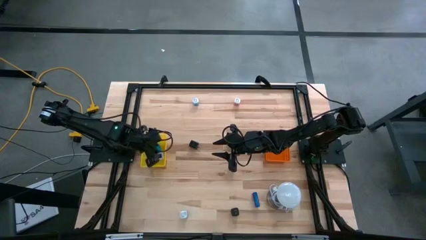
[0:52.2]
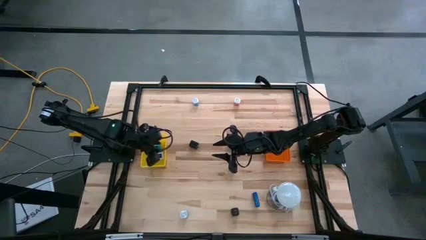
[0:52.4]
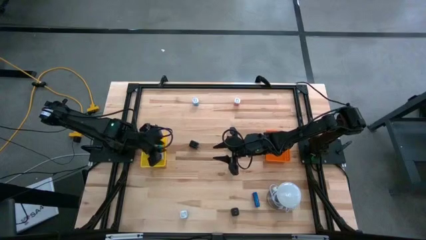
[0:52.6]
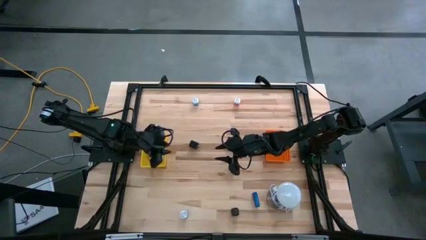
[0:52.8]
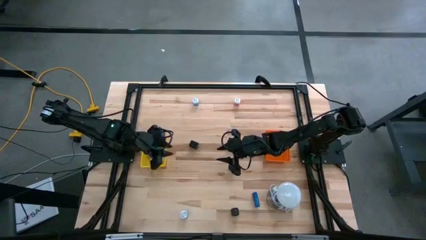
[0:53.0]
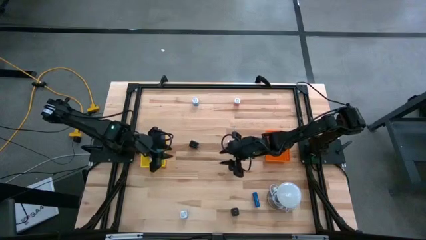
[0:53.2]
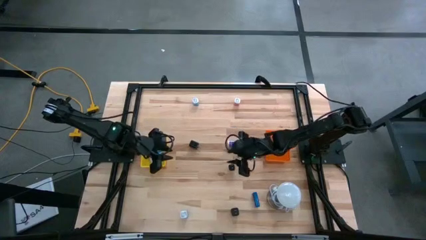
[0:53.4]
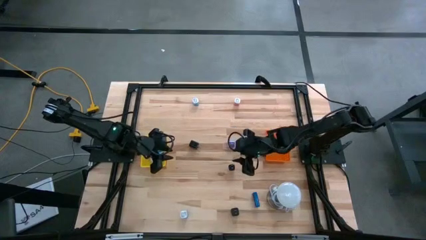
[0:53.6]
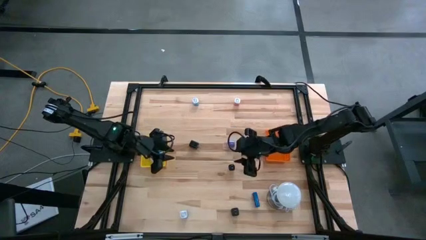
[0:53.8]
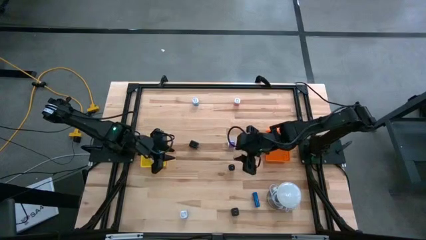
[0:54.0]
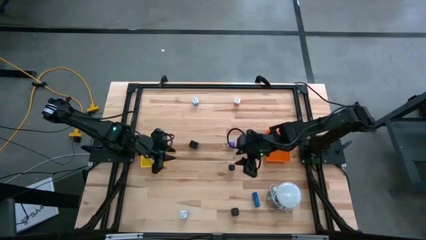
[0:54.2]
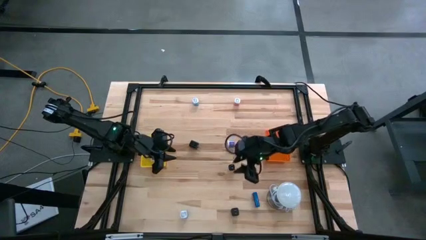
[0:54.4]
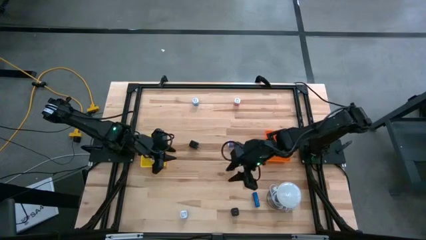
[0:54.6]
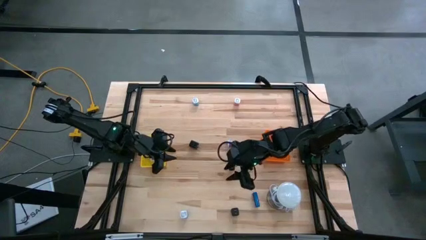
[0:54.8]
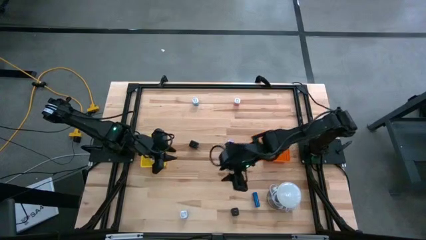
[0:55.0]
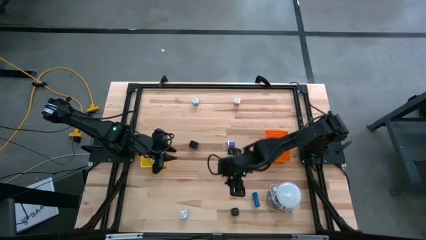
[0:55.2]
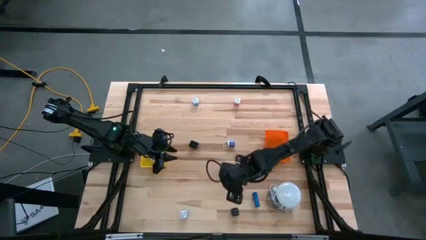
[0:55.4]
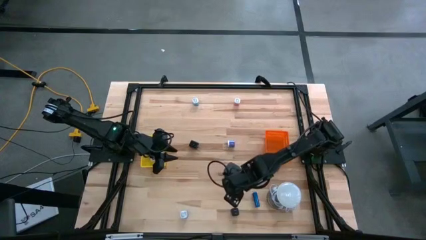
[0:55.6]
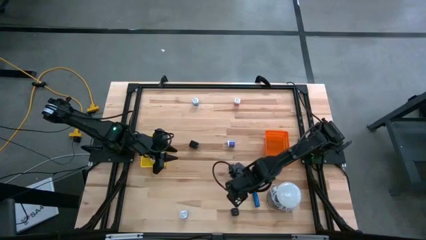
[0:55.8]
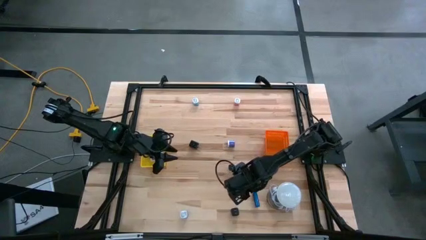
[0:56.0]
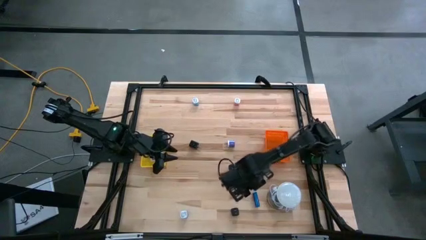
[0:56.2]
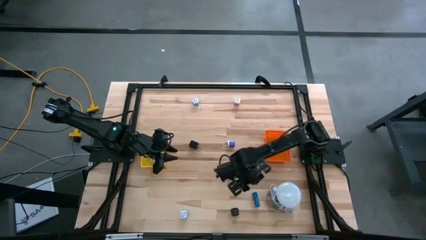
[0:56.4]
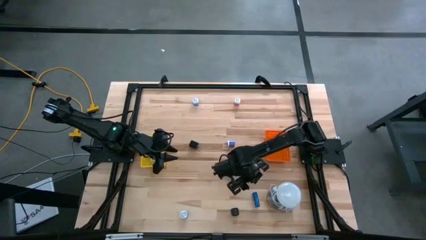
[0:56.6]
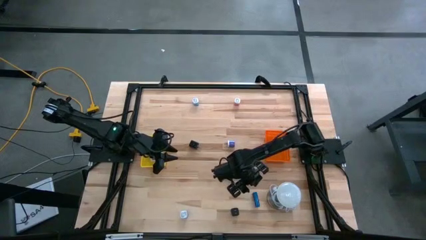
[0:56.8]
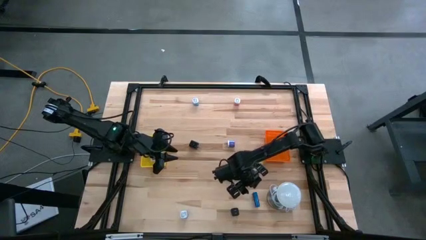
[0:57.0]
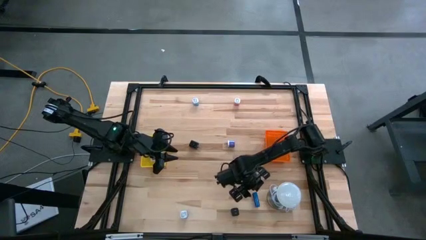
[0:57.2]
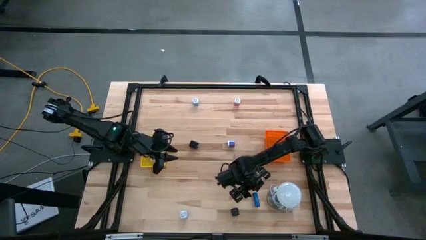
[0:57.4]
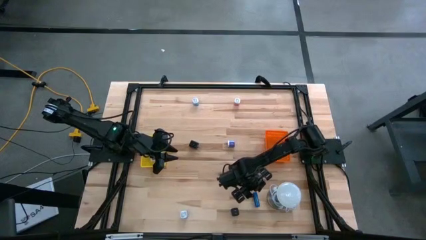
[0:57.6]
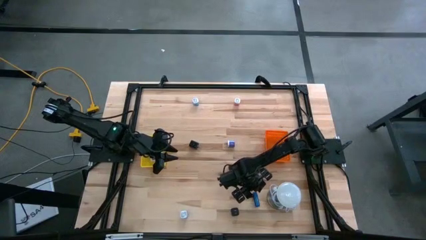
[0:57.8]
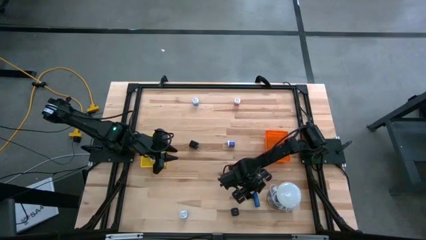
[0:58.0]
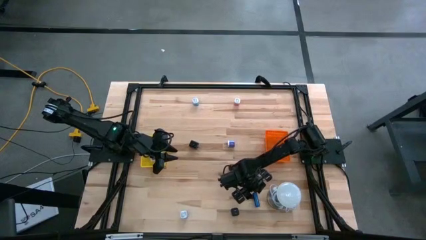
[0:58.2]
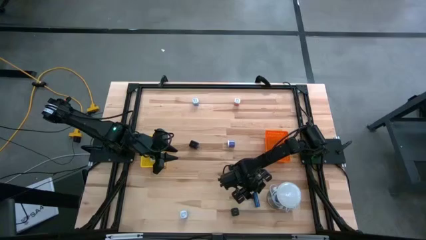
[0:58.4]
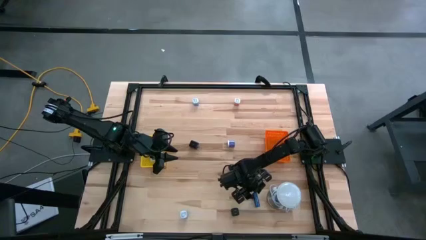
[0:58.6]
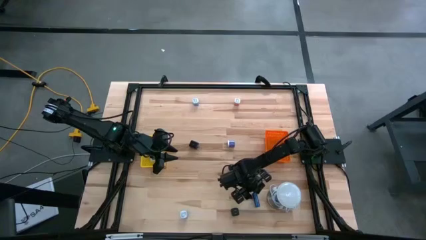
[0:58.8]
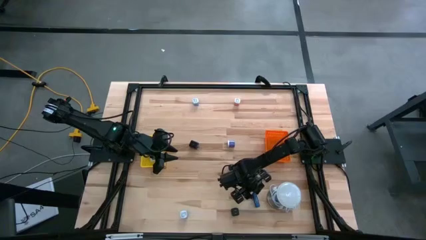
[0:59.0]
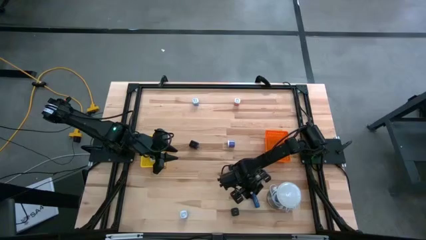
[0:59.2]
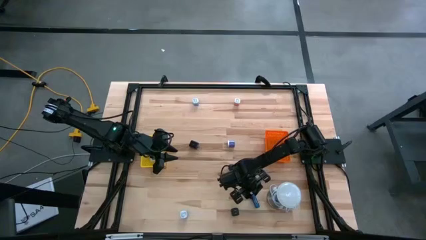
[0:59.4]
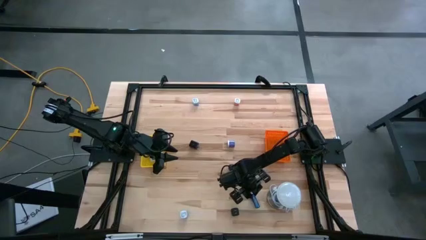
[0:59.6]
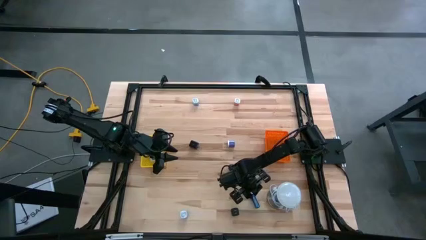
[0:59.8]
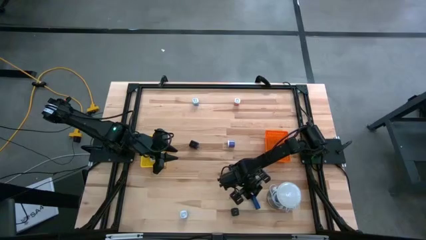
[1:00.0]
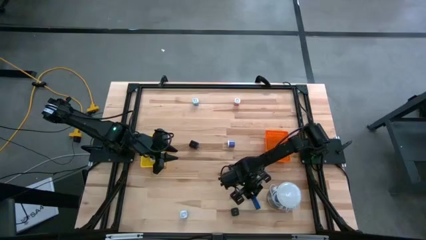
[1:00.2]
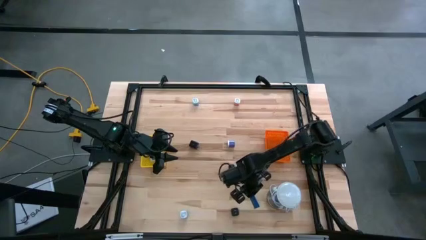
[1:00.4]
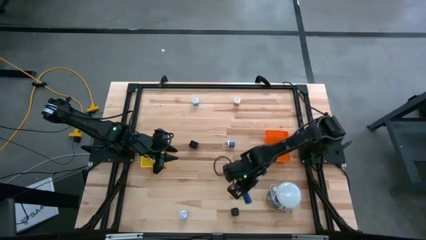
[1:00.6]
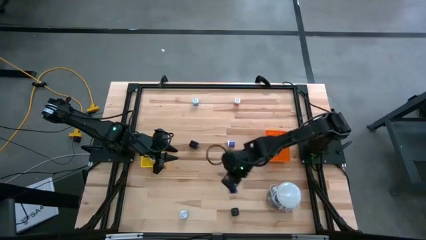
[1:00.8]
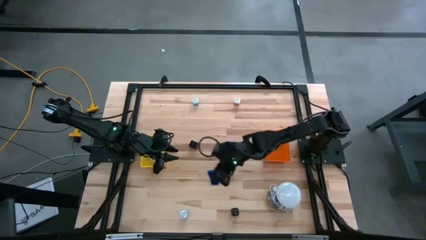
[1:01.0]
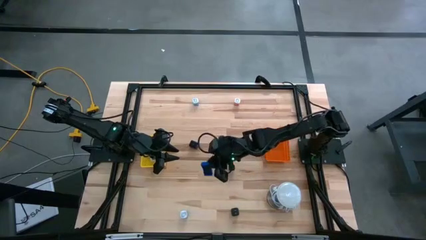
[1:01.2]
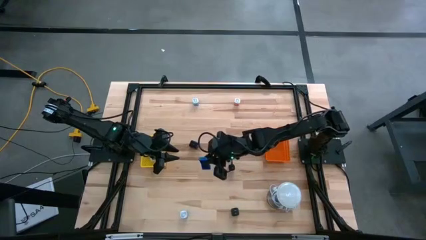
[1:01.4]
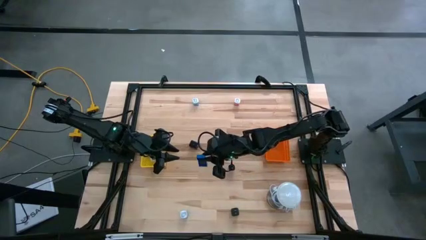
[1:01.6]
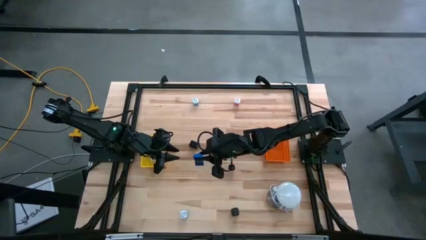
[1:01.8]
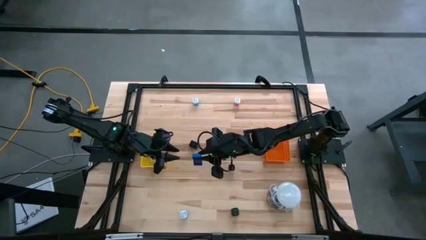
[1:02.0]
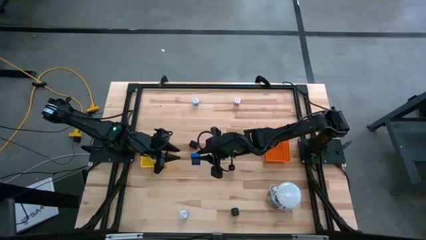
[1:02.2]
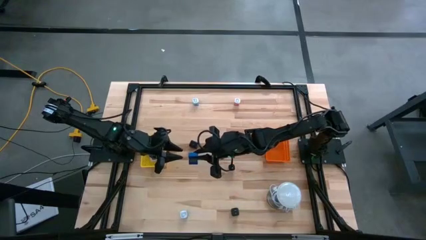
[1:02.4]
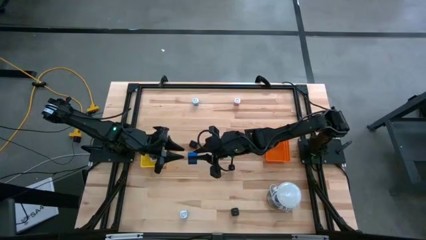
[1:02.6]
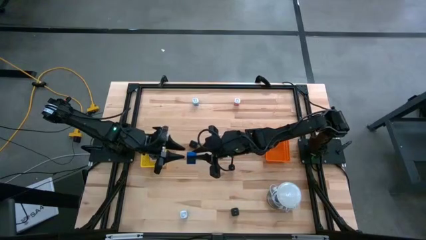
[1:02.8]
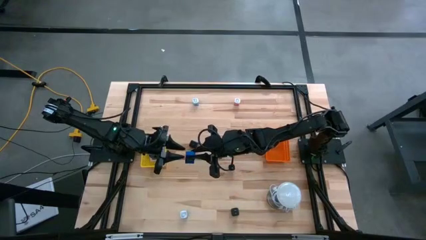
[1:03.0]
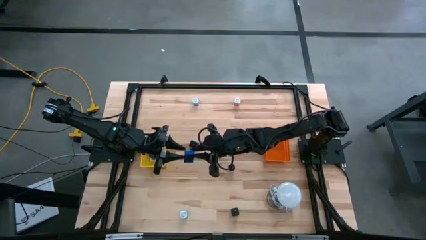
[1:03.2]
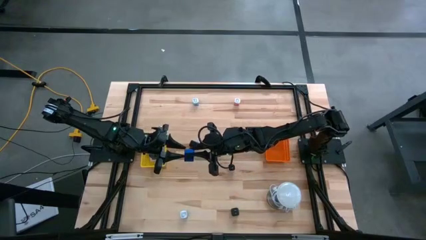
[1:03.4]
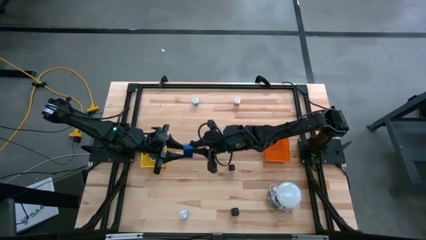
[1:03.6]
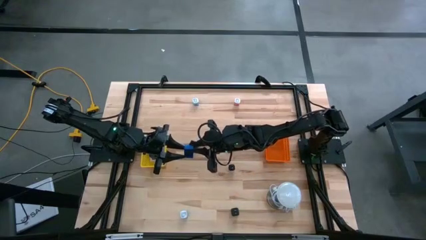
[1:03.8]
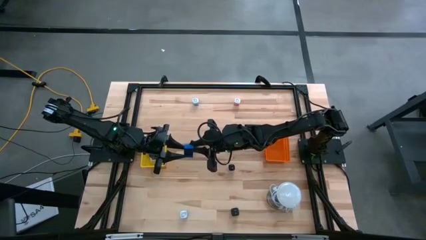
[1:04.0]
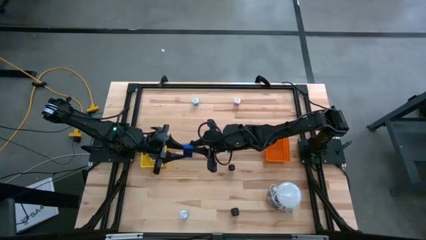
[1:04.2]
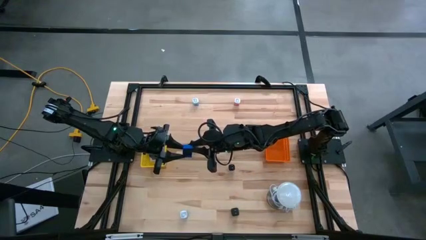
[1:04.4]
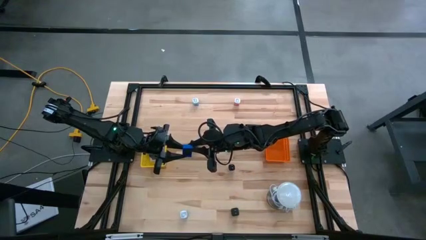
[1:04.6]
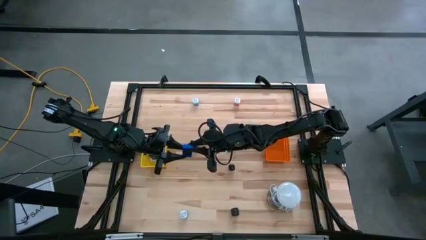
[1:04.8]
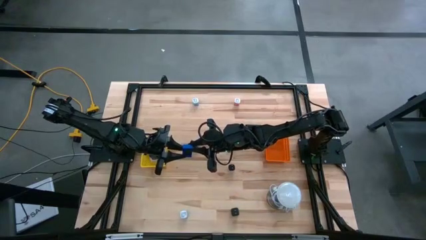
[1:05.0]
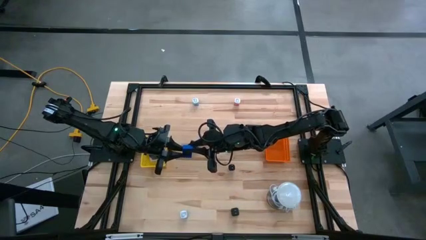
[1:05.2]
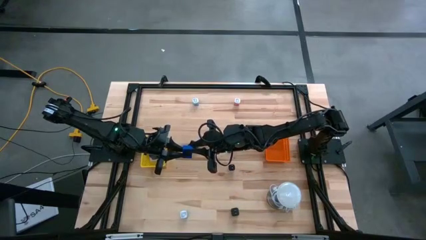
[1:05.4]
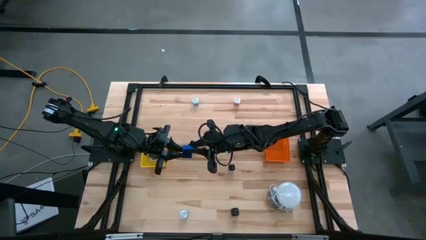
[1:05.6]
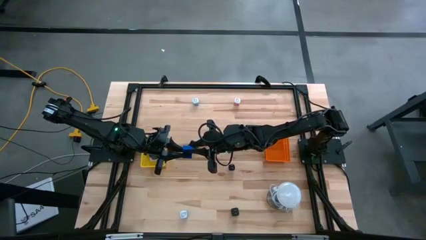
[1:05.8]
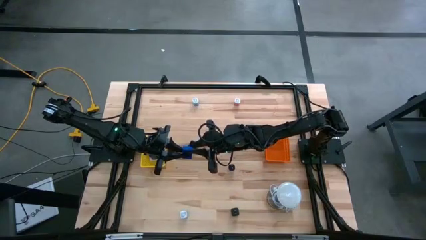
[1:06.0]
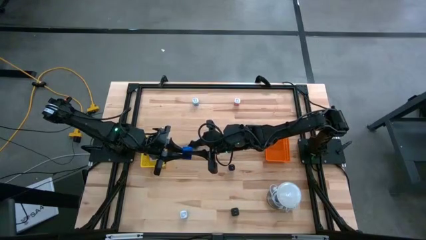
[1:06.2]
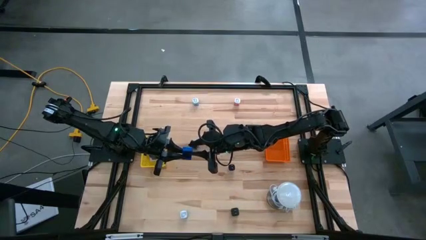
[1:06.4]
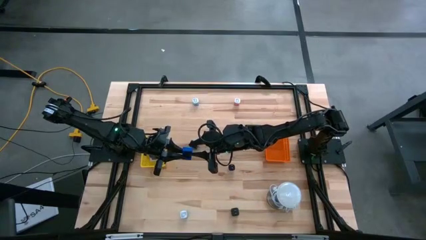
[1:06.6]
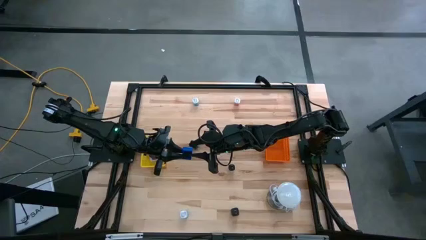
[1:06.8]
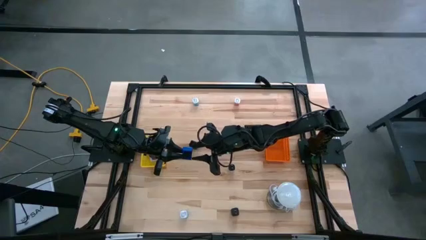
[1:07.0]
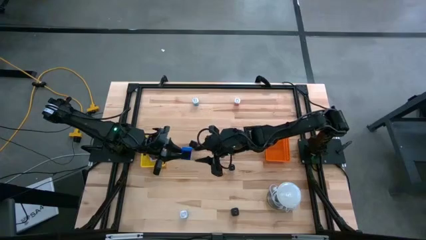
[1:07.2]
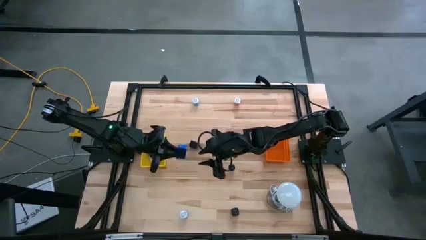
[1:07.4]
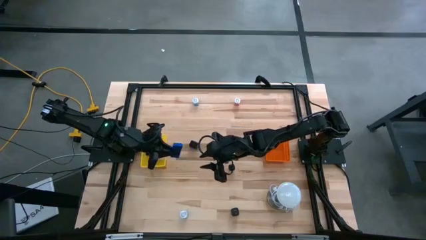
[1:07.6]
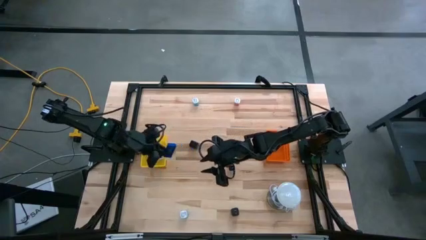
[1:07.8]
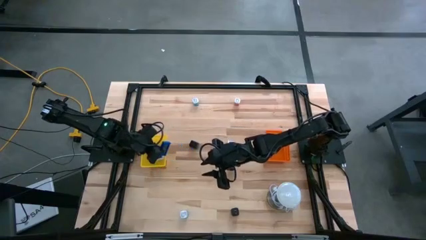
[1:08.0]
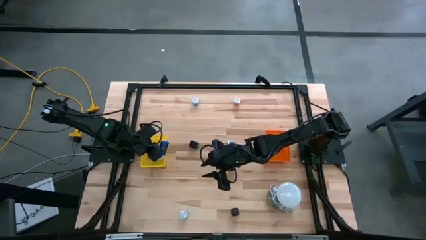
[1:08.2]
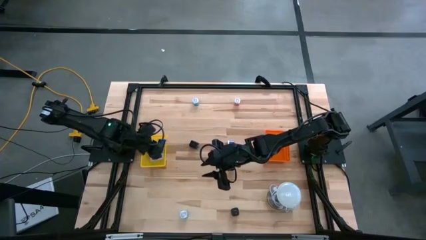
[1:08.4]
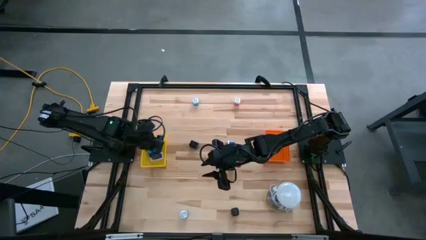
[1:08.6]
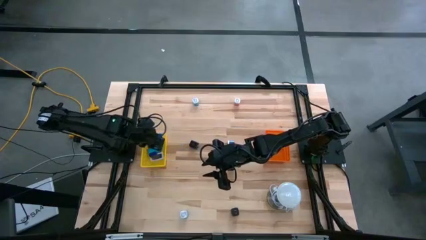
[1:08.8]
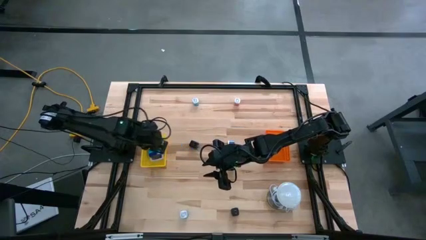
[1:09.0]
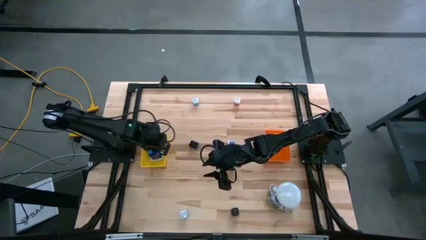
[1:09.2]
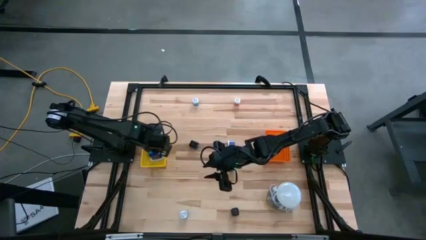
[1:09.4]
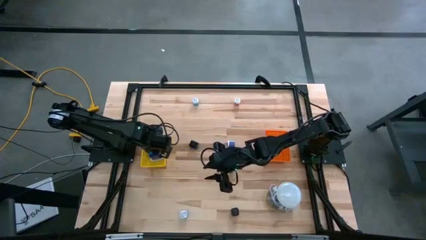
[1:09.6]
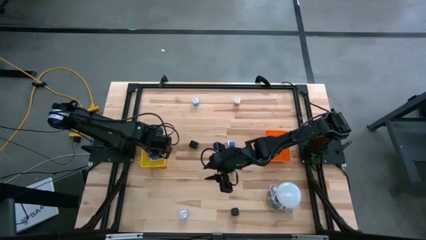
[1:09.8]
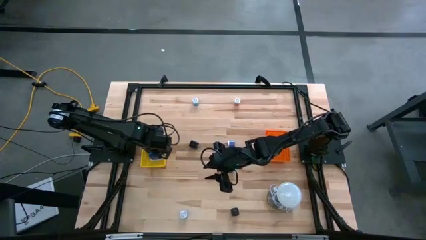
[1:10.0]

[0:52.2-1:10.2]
Task: Pick & Place Office items
Put the blue digital timer into the yellow bin
